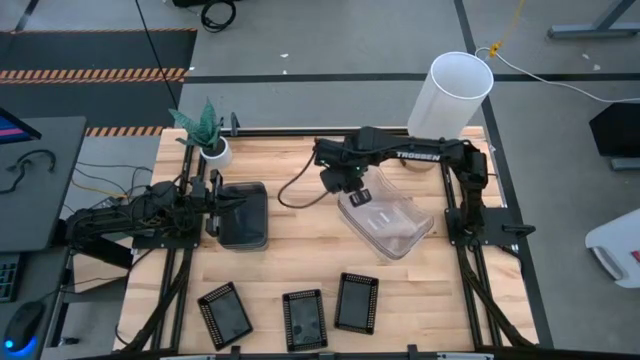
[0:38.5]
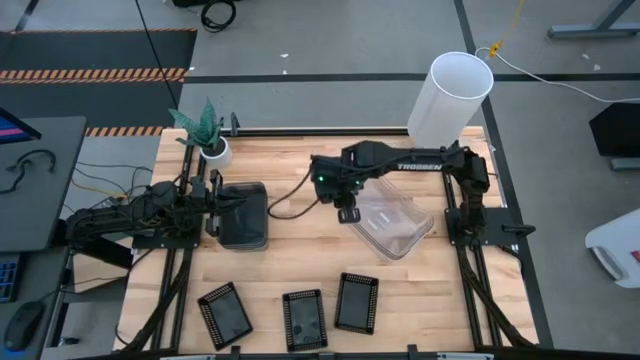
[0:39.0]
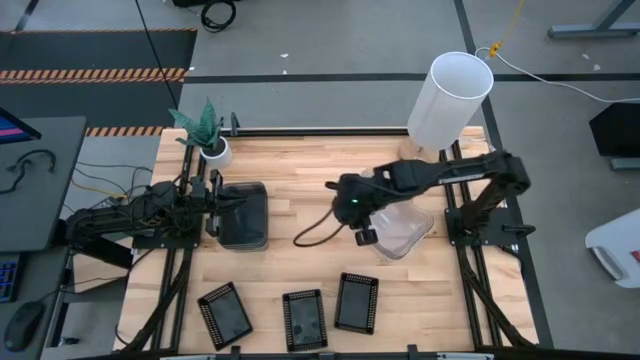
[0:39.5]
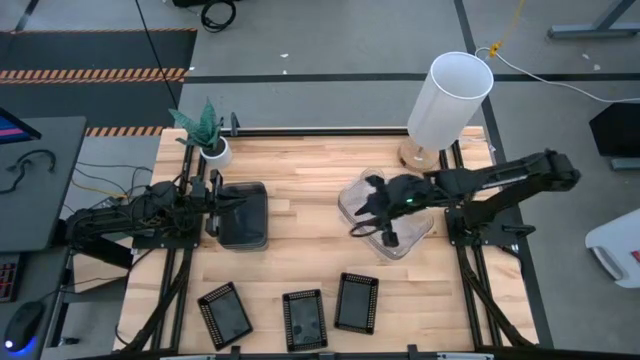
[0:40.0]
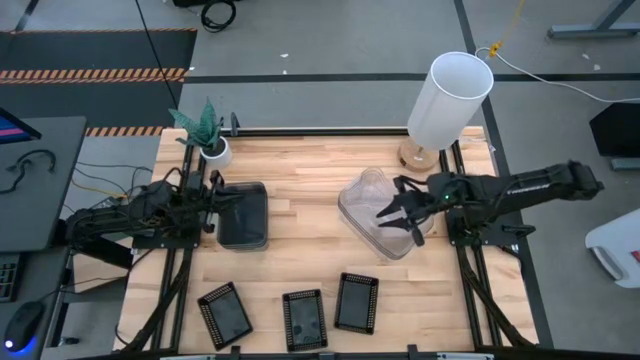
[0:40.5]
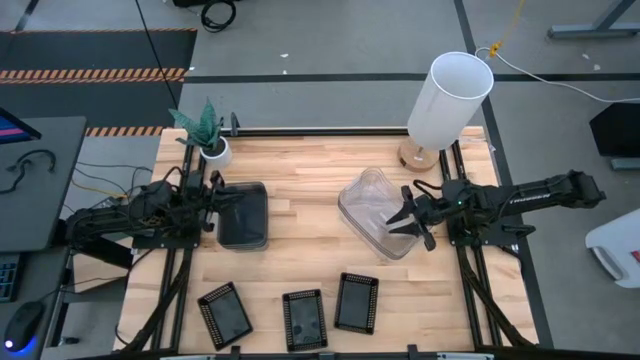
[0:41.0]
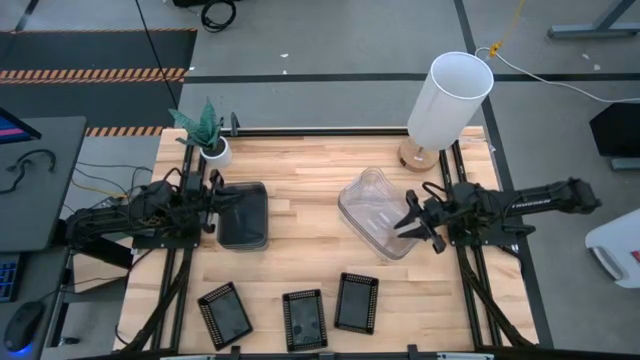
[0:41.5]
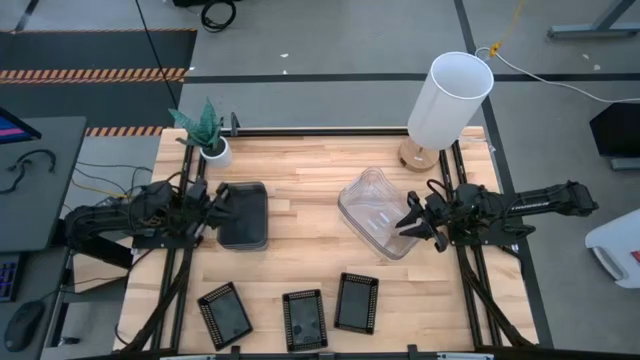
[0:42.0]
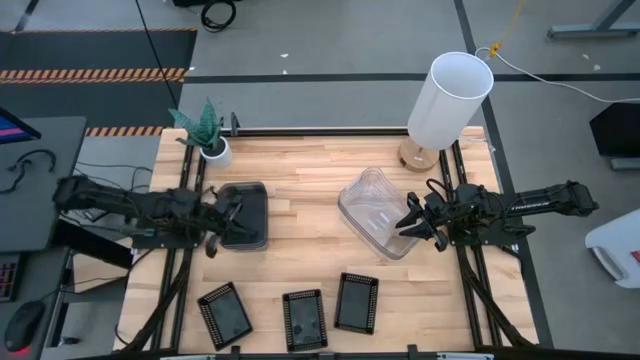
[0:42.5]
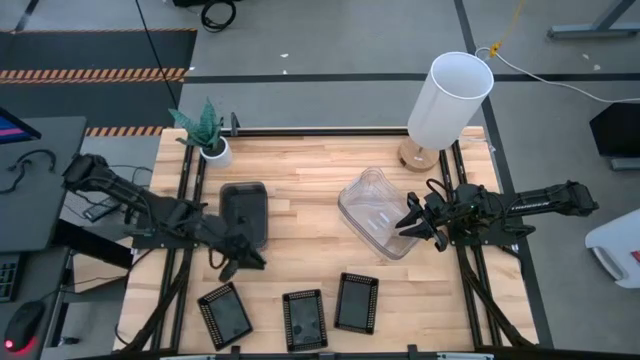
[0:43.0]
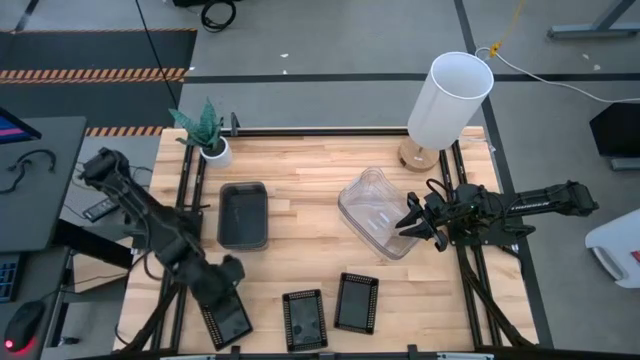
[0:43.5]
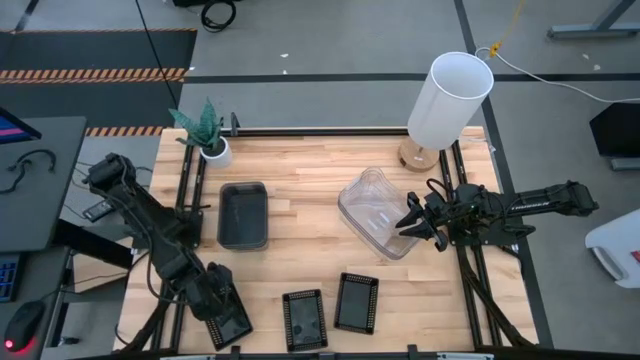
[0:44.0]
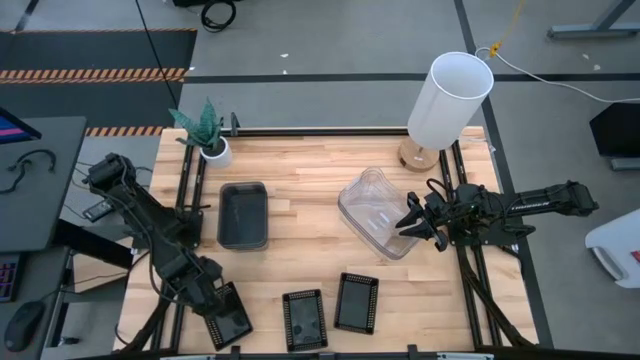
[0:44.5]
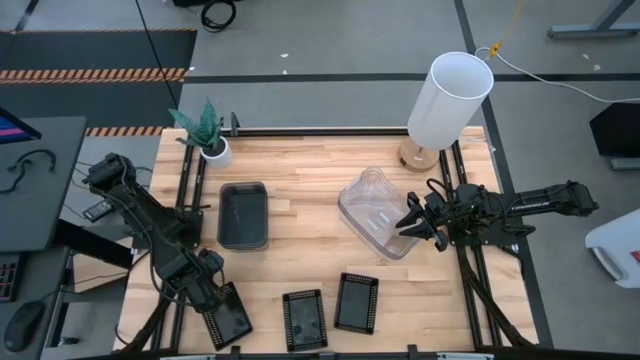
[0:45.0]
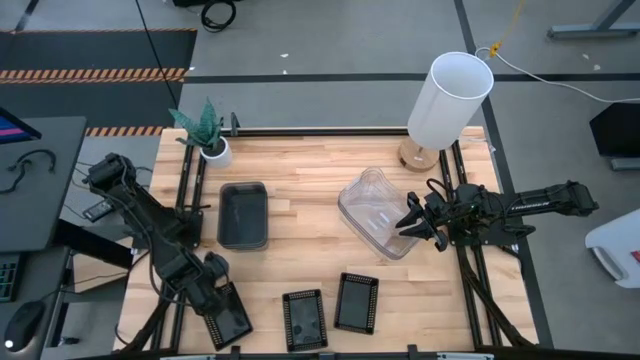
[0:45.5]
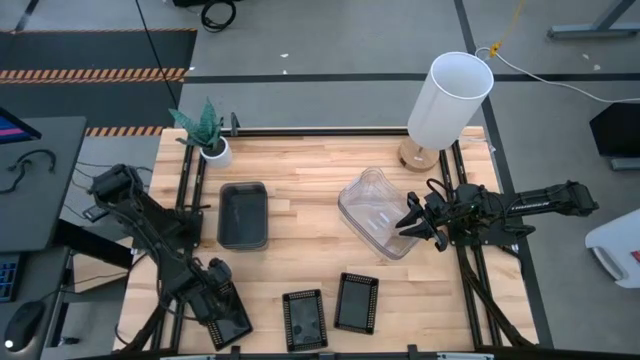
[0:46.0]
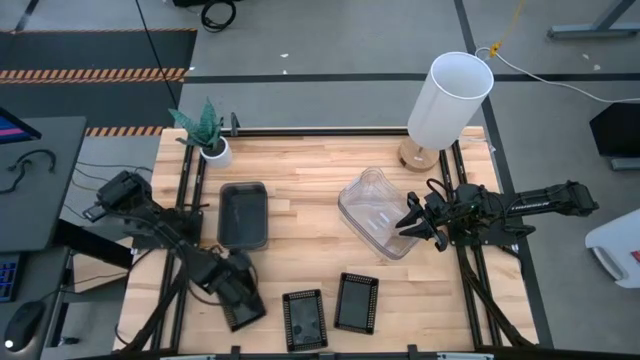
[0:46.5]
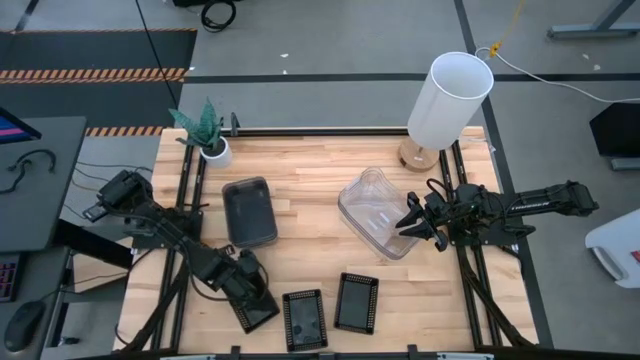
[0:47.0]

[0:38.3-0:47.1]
Adjust the black bin on the table

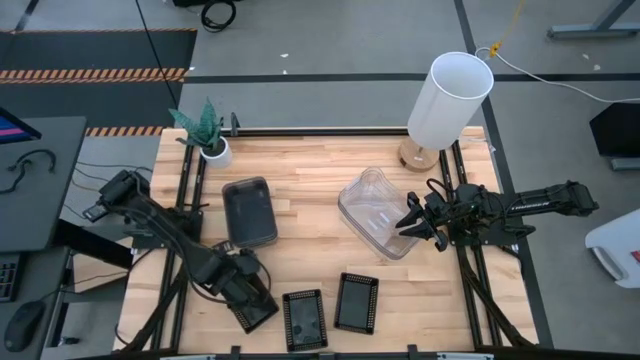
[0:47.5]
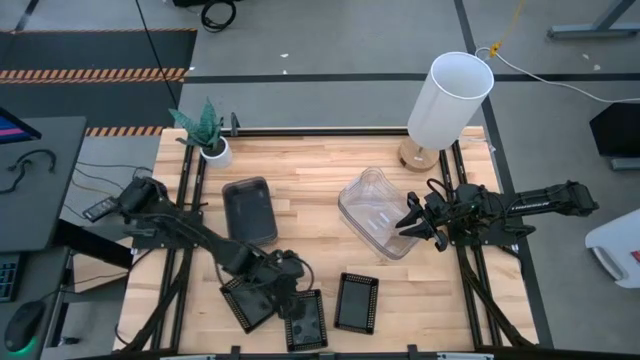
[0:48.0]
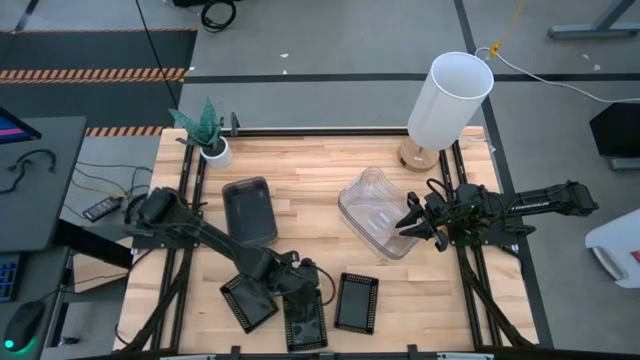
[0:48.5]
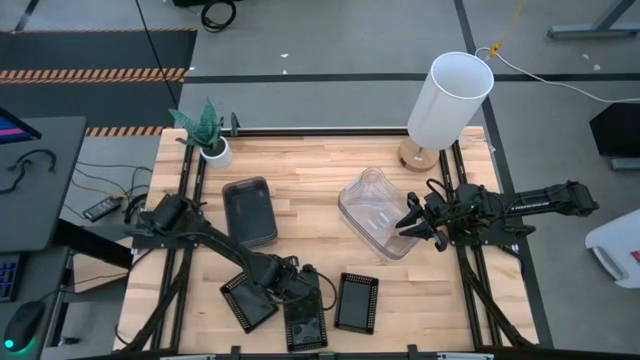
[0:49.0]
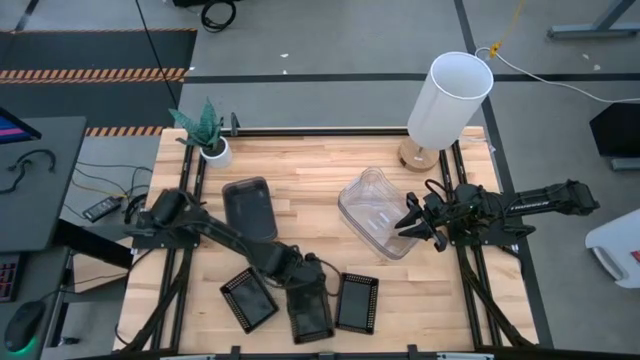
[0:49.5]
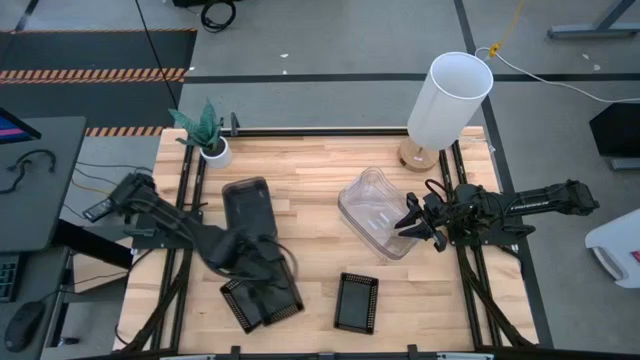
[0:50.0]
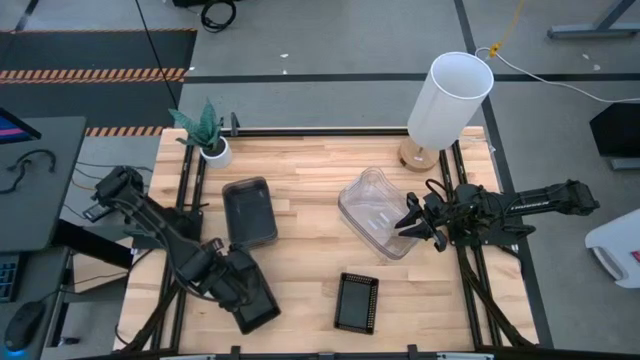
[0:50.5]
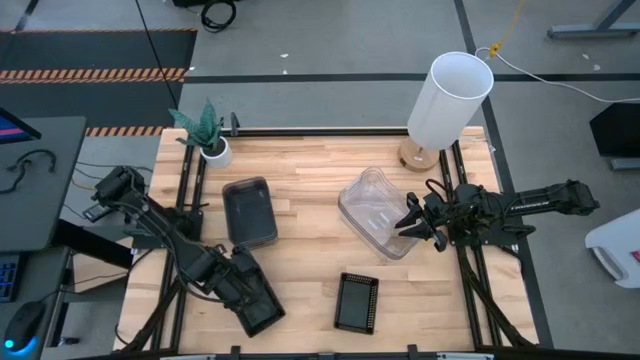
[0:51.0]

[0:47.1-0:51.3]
Stack the middle black bin on top of the left black bin

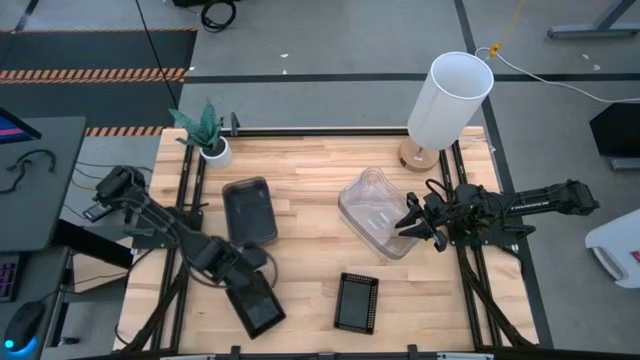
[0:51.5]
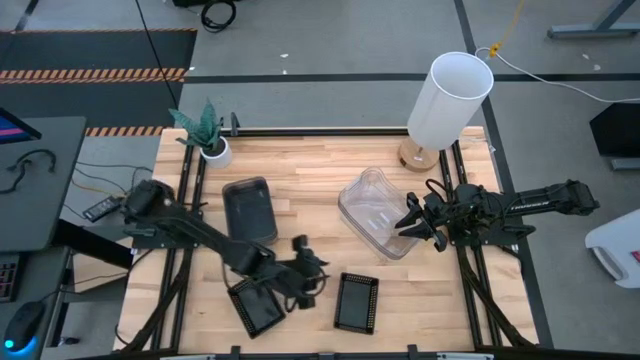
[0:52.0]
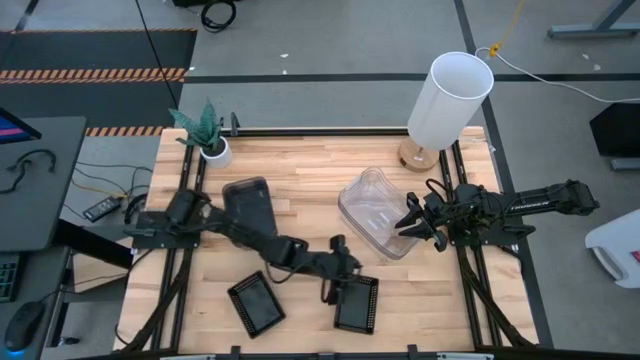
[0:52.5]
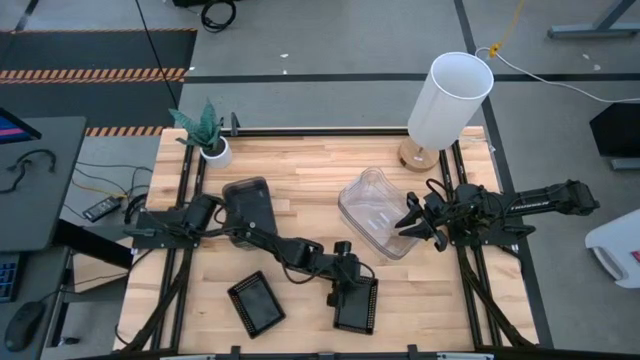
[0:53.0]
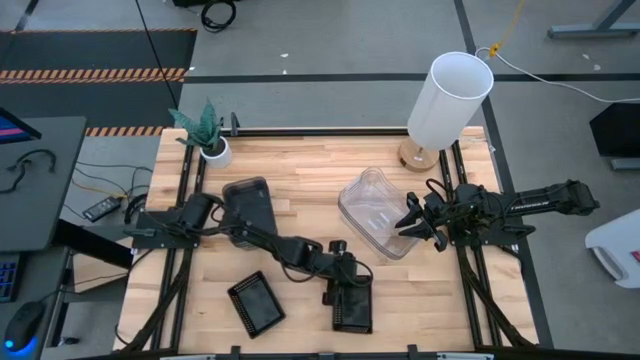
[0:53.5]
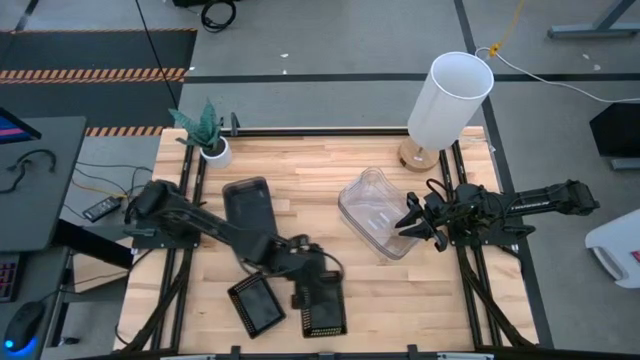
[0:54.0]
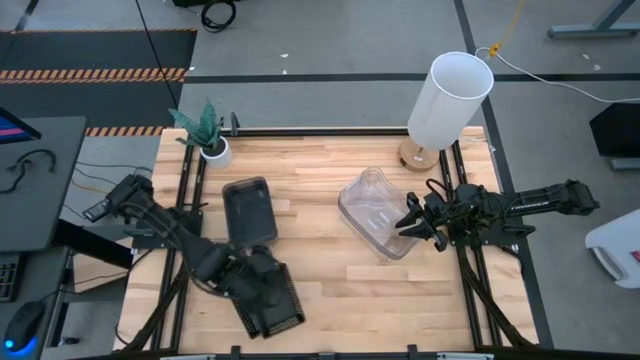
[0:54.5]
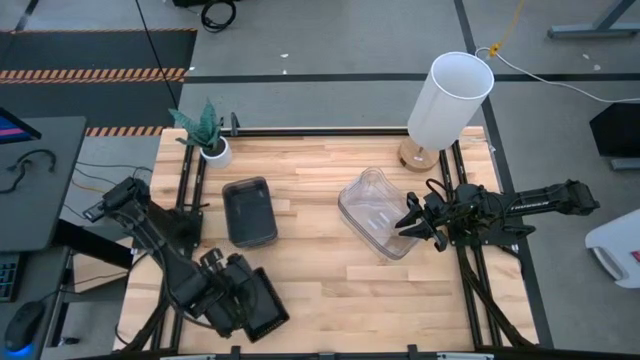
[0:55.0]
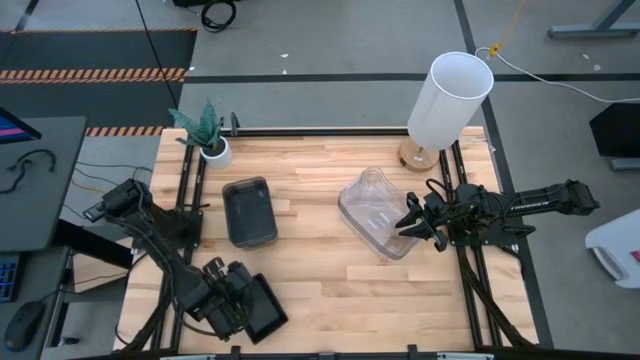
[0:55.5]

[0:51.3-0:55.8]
Stack the right black bin on top of the left black bin

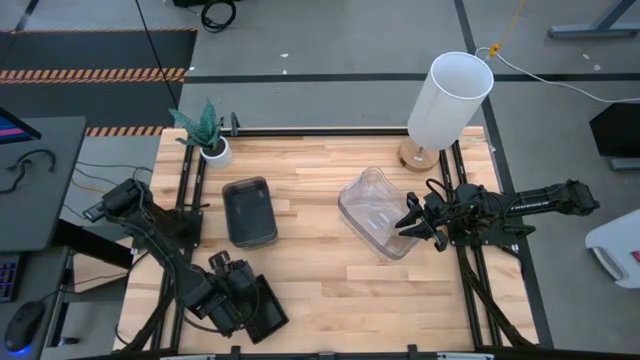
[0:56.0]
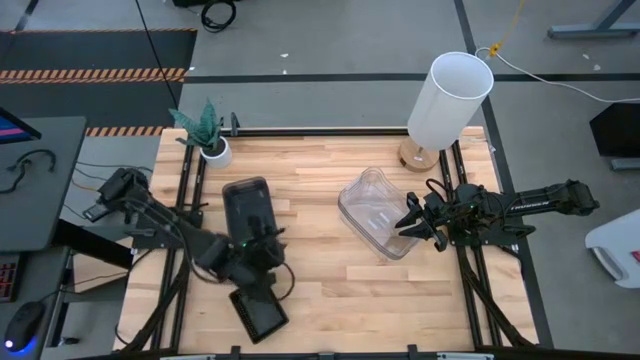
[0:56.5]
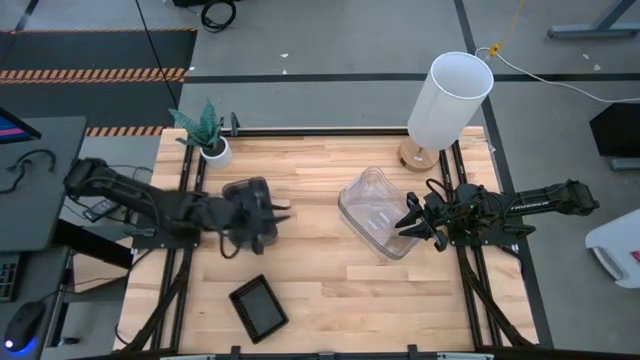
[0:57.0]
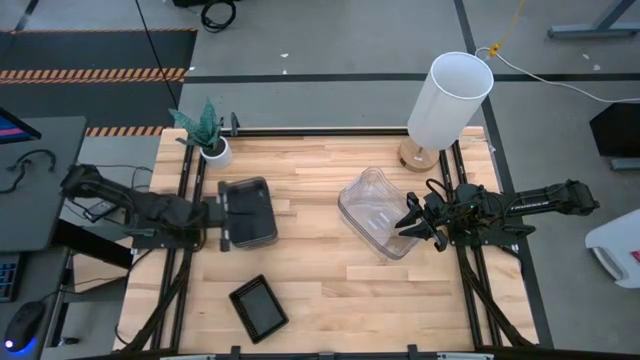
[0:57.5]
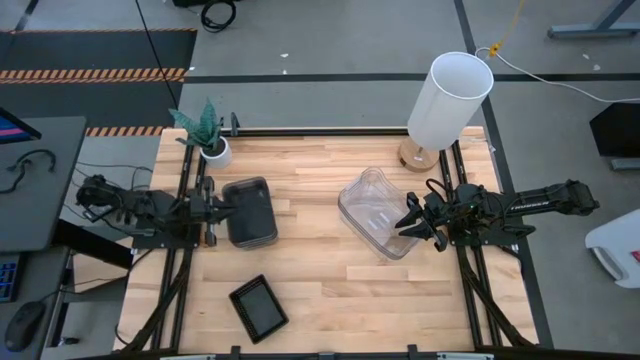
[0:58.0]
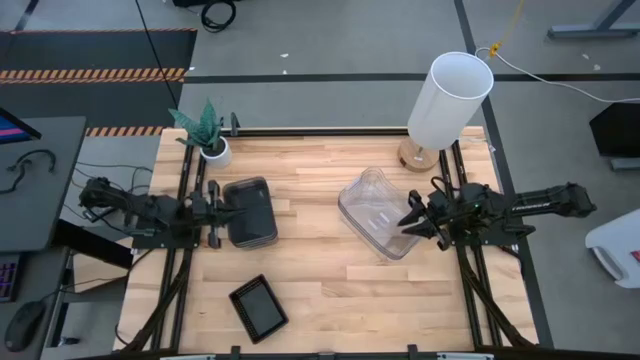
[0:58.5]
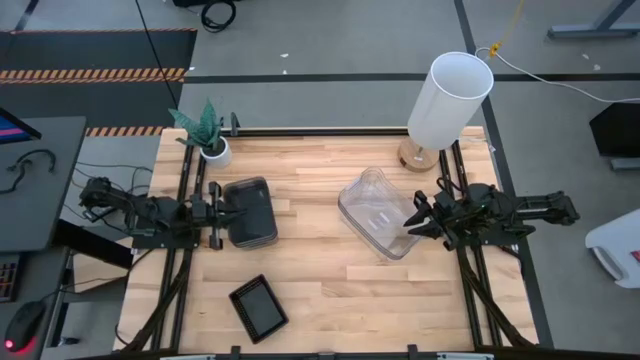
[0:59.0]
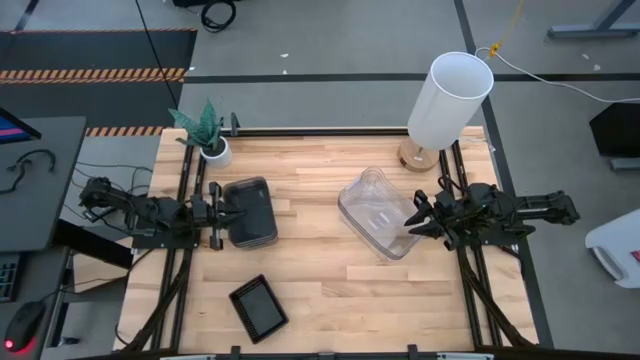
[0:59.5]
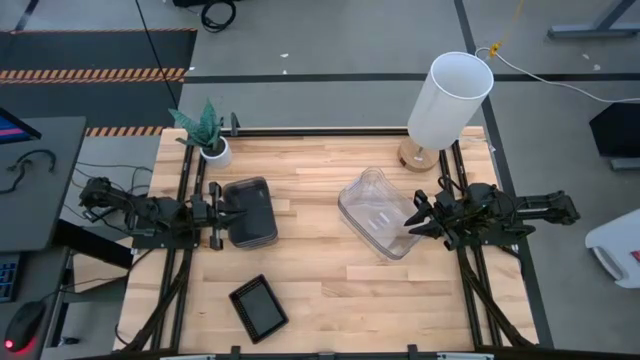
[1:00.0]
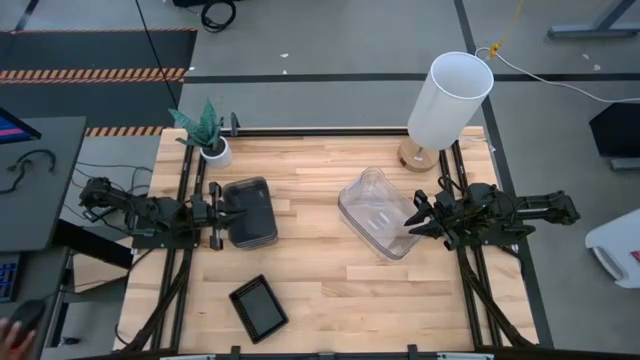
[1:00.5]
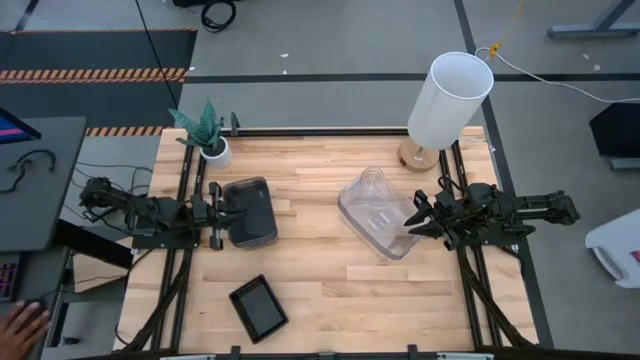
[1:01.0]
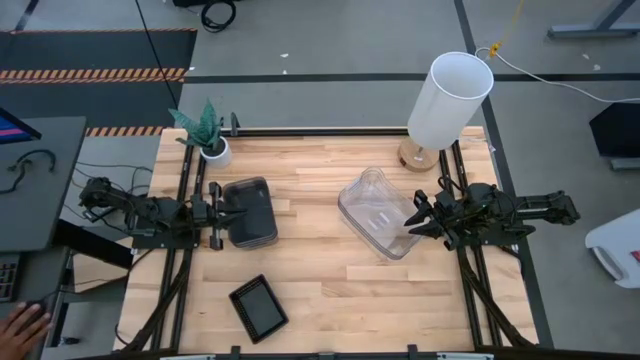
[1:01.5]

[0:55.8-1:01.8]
Return to Home Position
